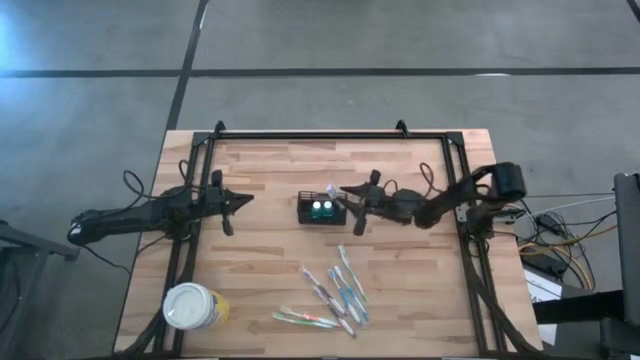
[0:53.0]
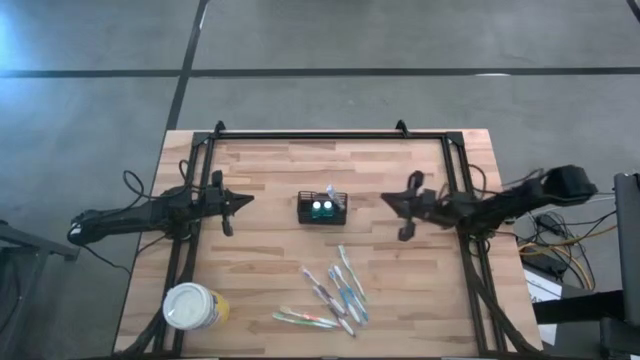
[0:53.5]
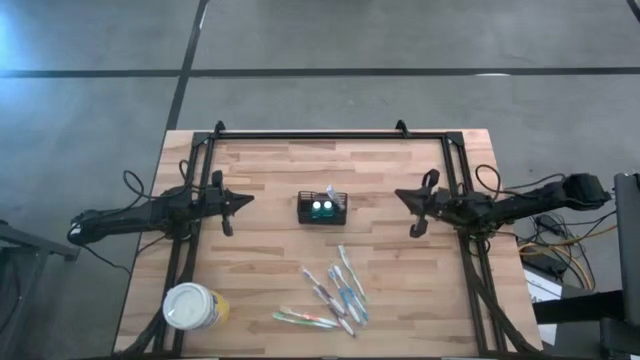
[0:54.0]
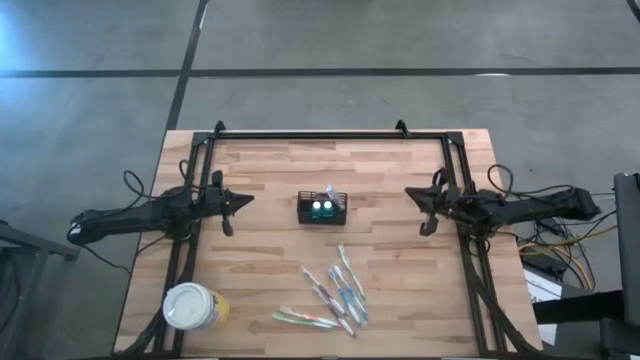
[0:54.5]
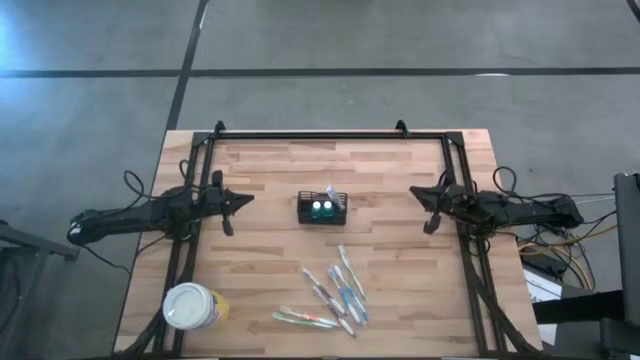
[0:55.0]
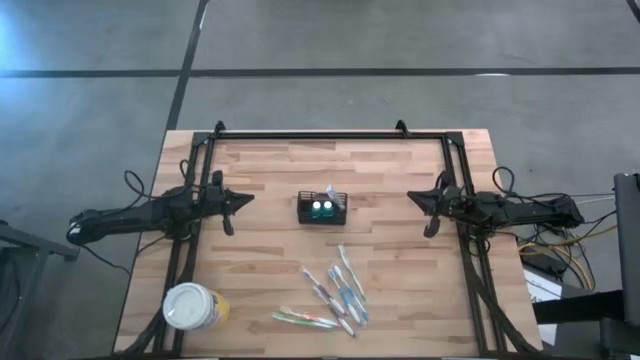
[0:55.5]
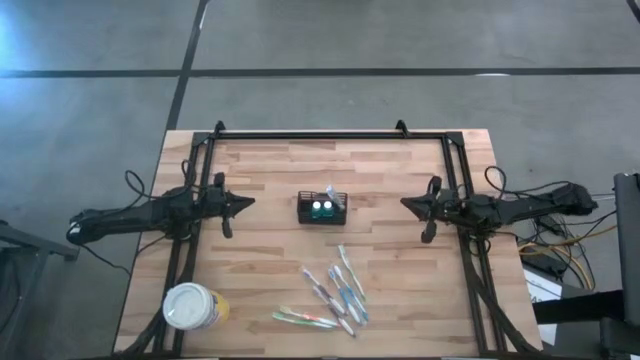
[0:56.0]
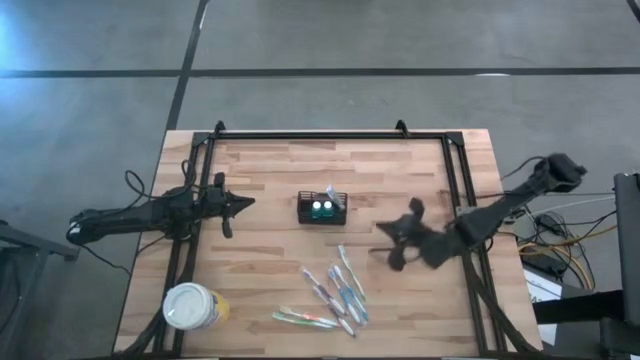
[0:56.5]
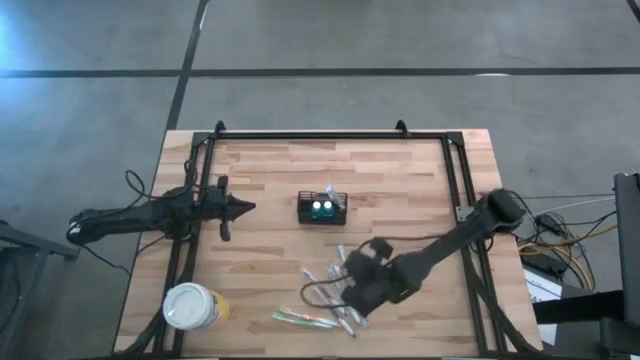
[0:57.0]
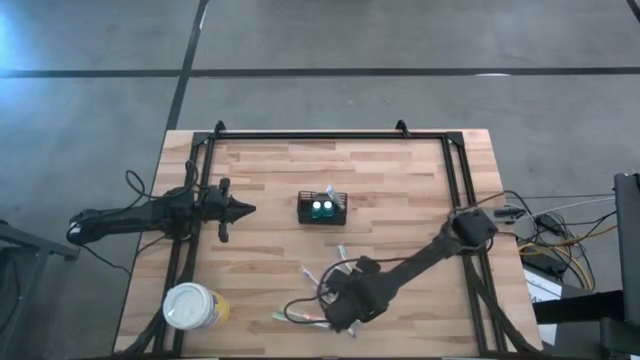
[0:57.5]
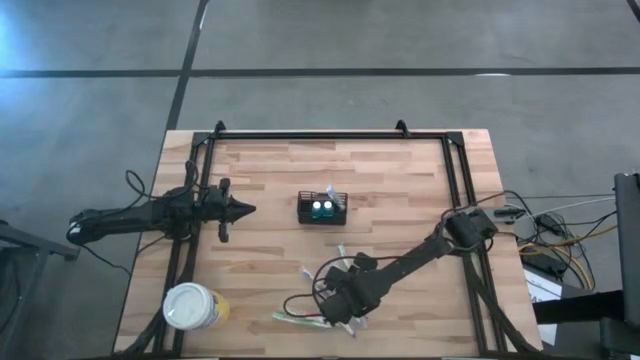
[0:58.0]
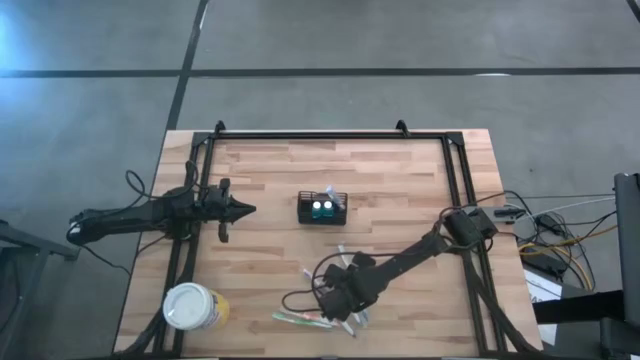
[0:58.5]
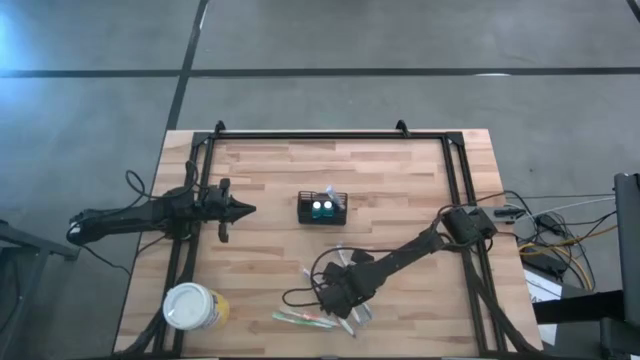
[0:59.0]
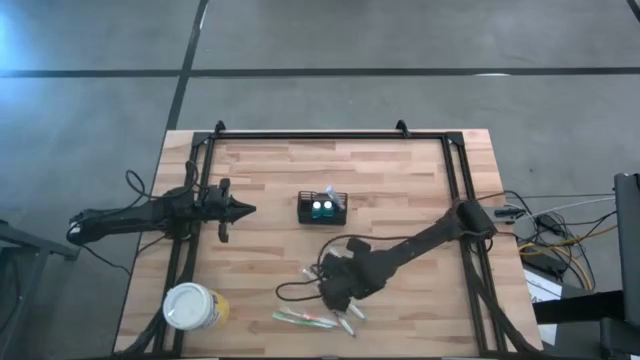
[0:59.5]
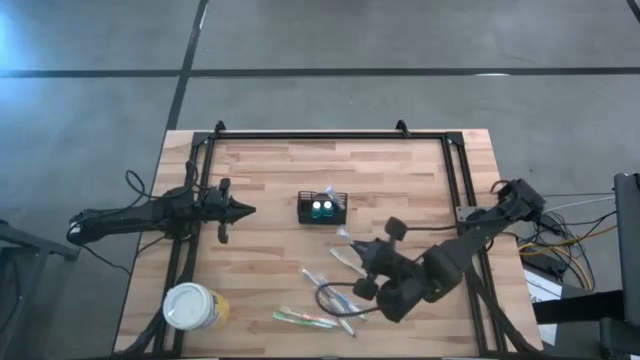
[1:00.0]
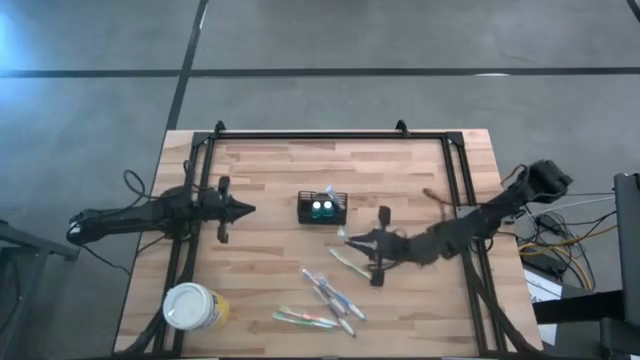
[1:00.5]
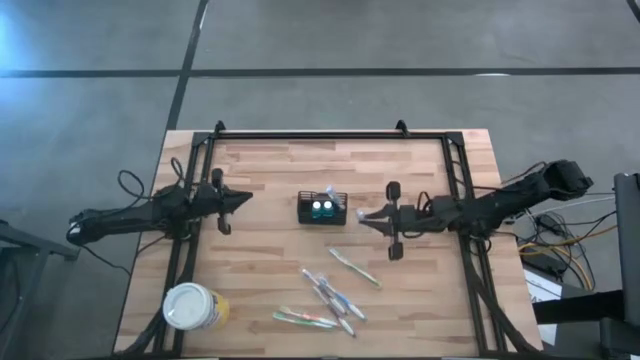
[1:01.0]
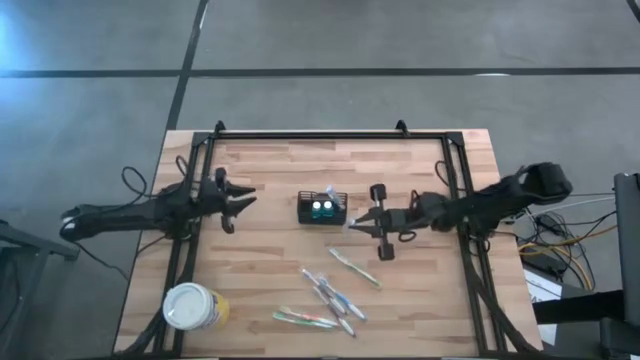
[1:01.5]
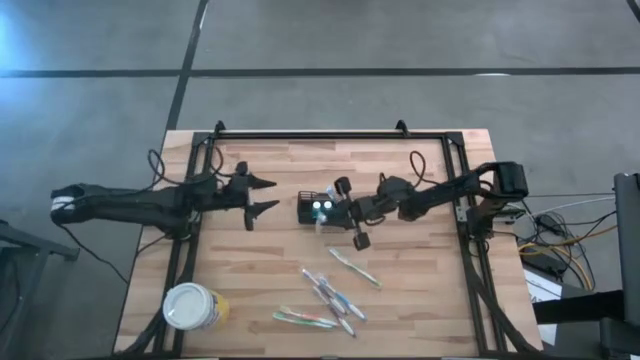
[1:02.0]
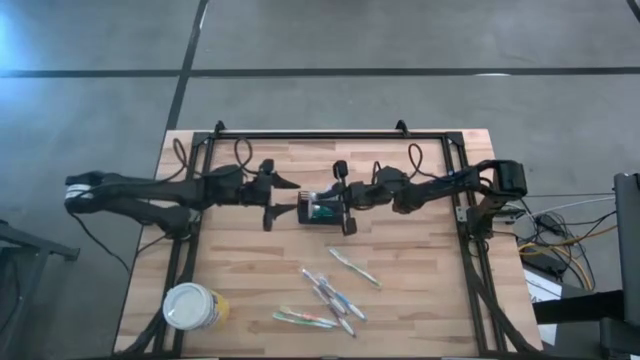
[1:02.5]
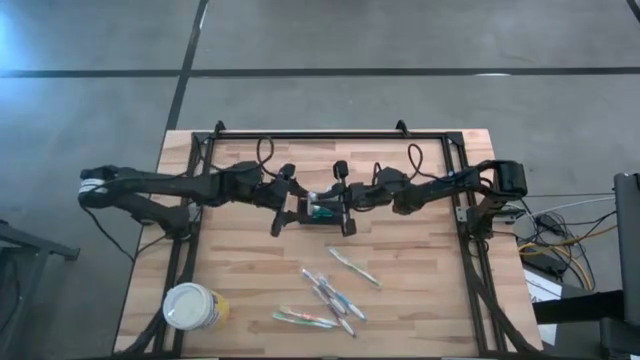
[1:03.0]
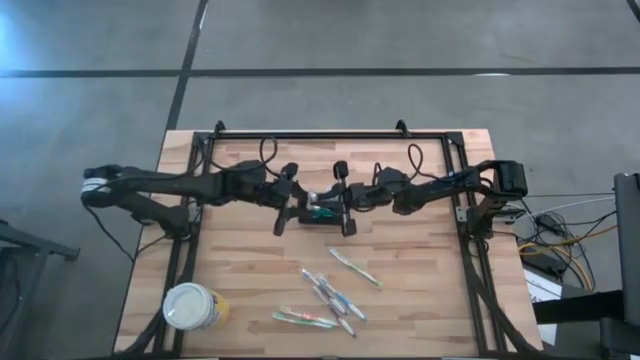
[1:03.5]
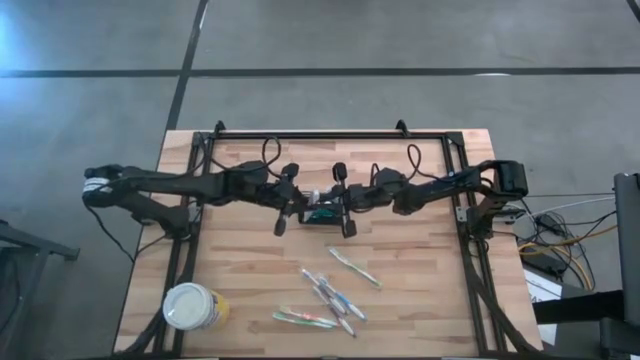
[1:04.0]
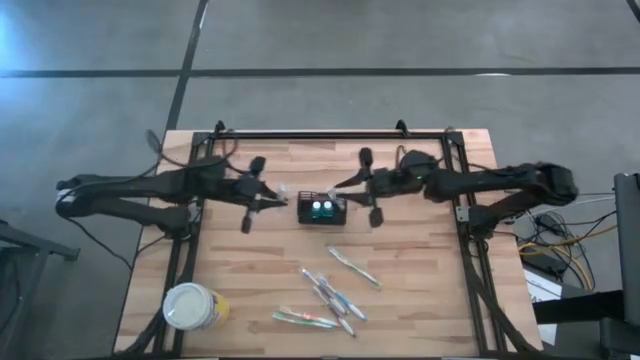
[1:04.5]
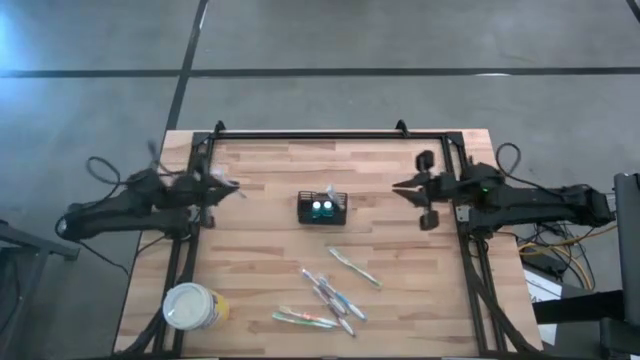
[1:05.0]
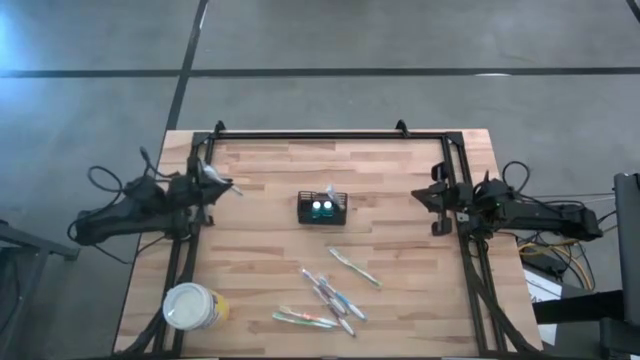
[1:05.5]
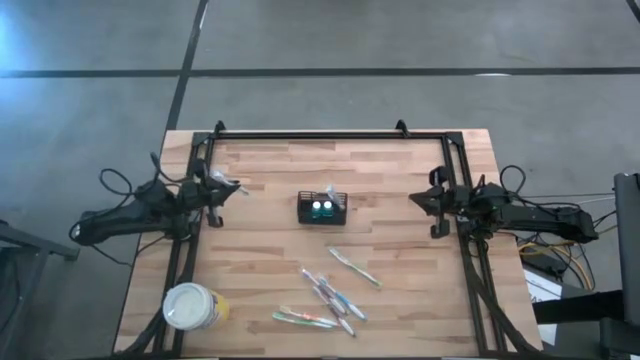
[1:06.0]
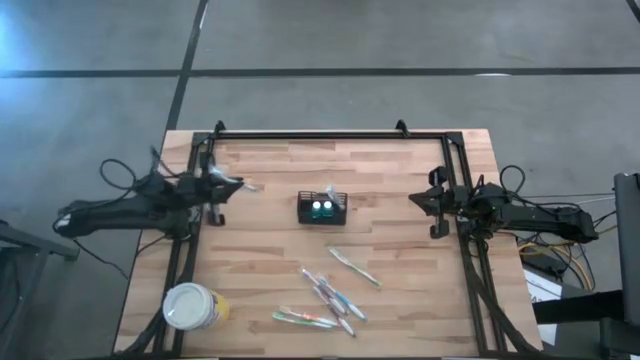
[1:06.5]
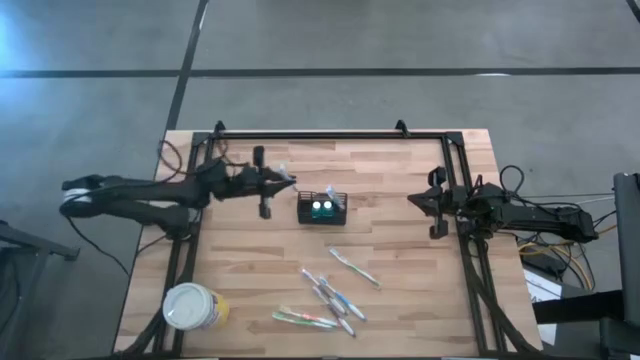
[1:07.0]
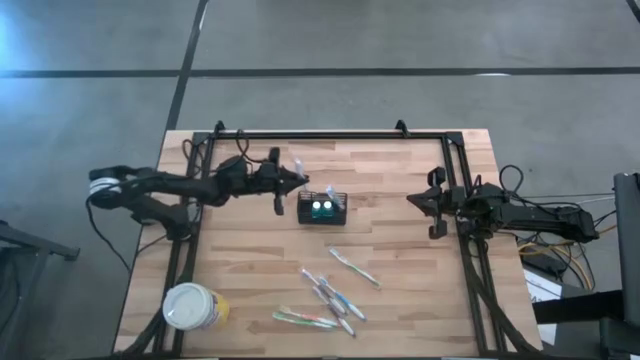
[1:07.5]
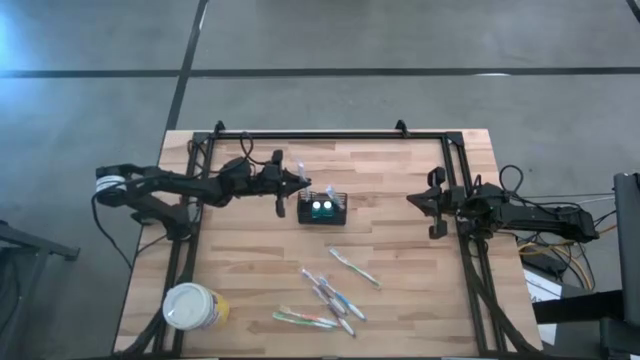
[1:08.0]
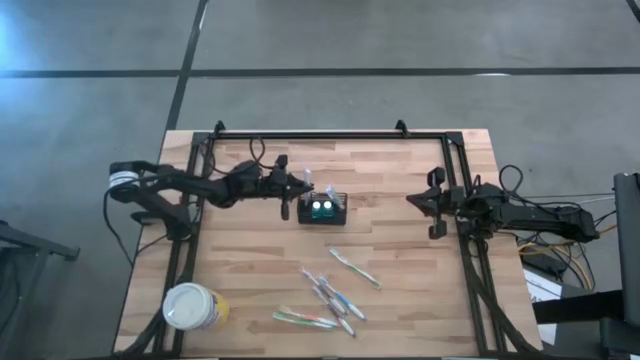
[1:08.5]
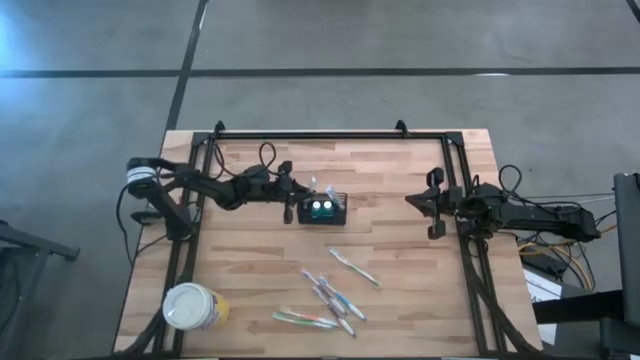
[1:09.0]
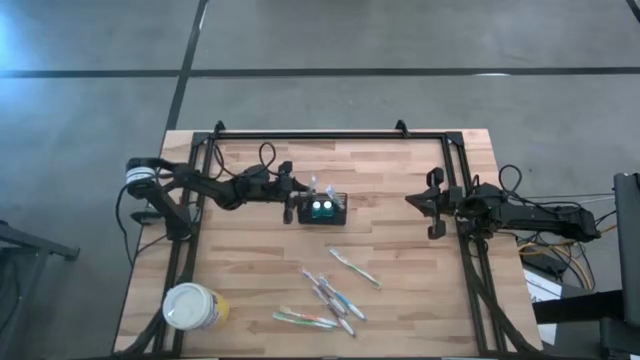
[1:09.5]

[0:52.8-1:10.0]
Task: Pick & Place toothbrushing station
Put the blue toothbrush into the wire organizer

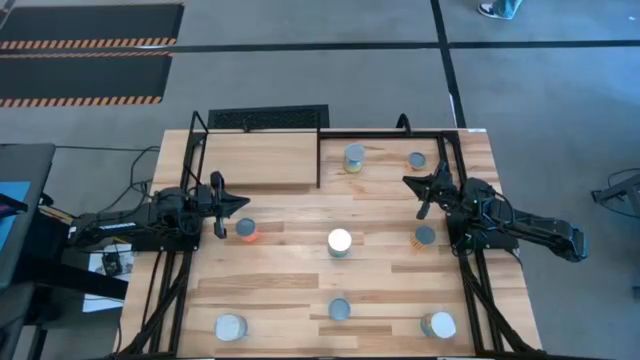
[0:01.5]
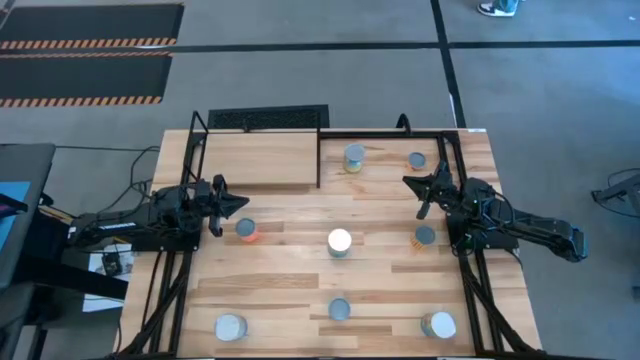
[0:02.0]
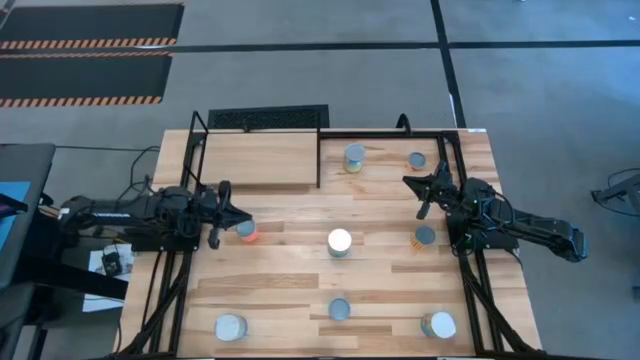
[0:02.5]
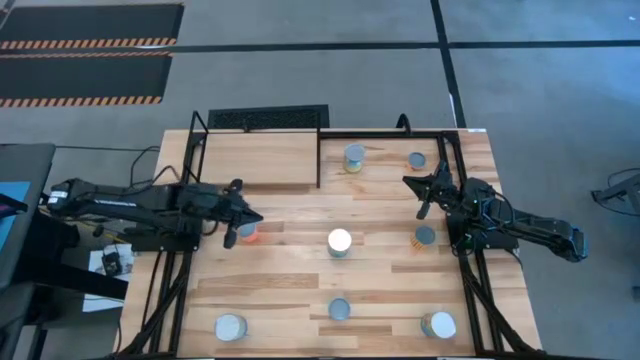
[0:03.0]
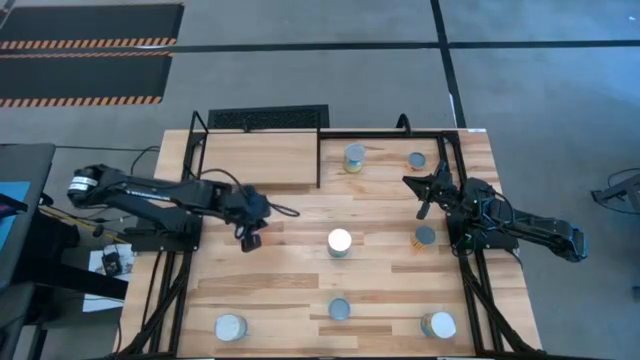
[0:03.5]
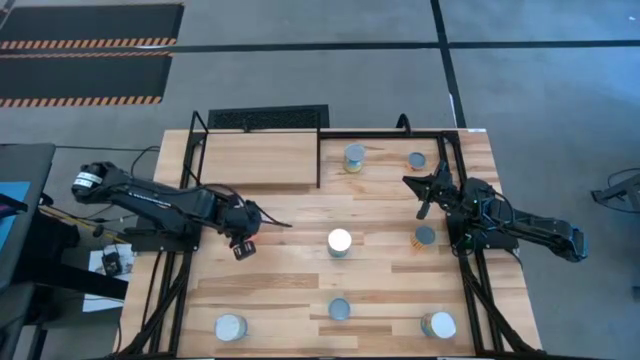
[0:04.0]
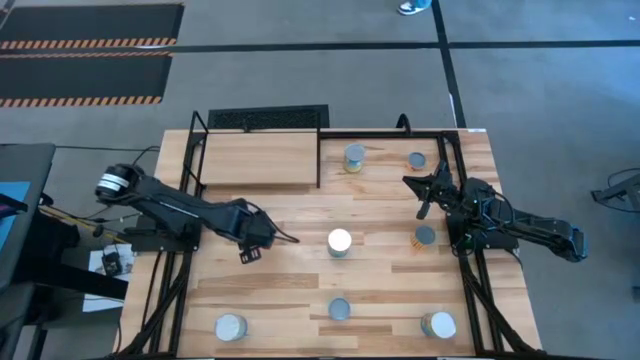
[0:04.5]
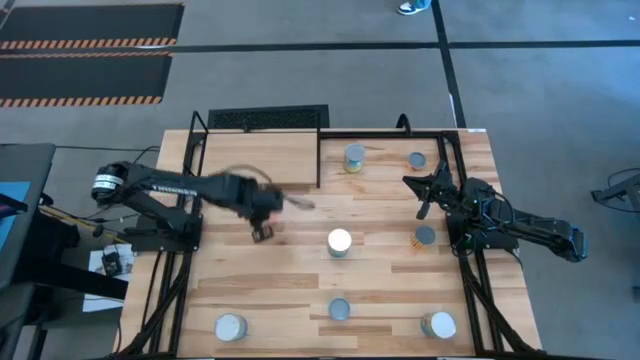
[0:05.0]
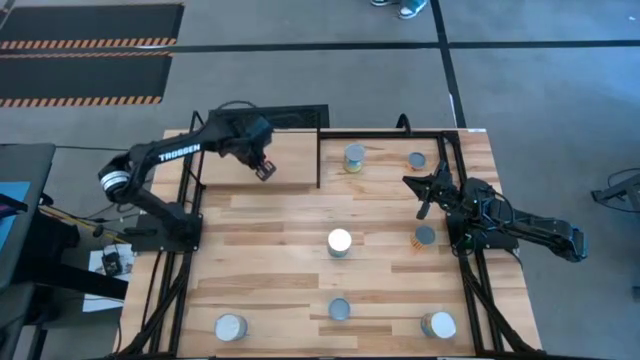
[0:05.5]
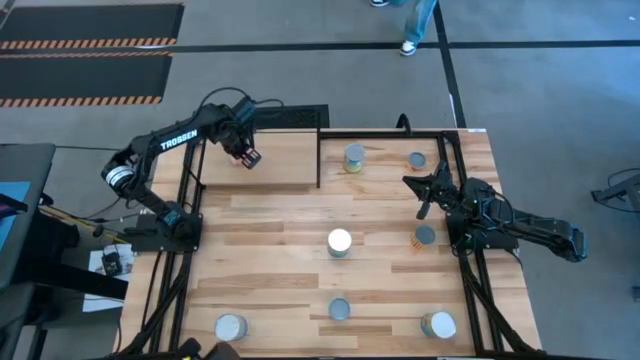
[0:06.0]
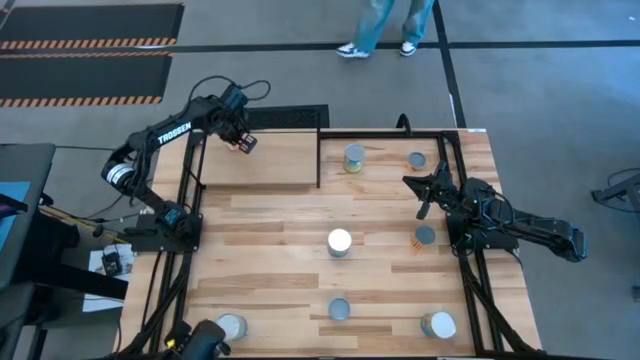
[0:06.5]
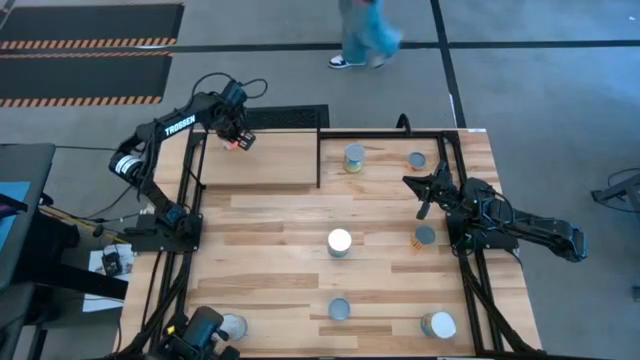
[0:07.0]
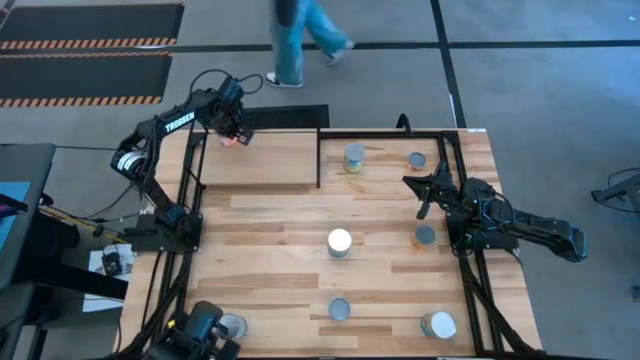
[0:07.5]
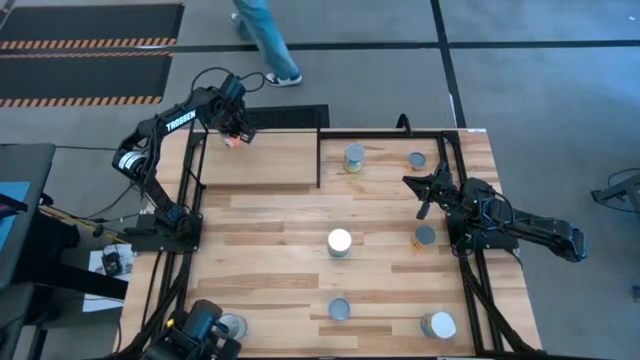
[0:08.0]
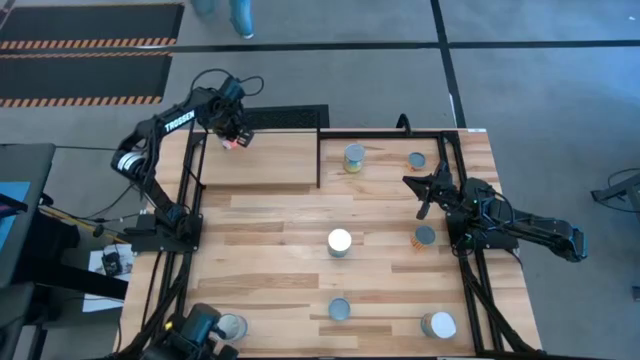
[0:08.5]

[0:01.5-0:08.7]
Task: Pick and place cans onto a shelf
Put the small canned diced tomatoes on the shelf
